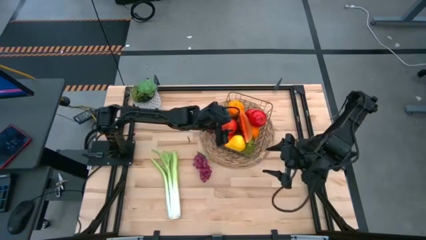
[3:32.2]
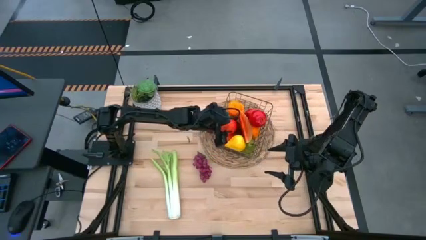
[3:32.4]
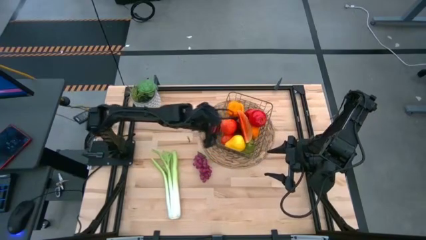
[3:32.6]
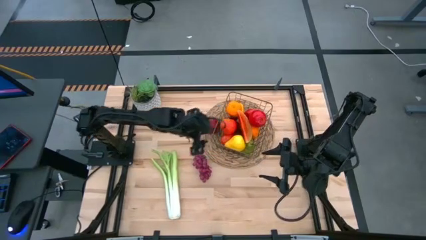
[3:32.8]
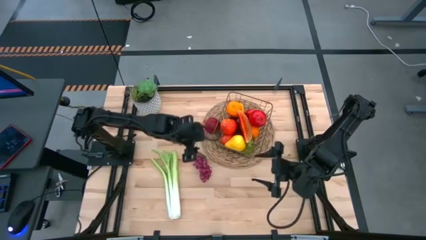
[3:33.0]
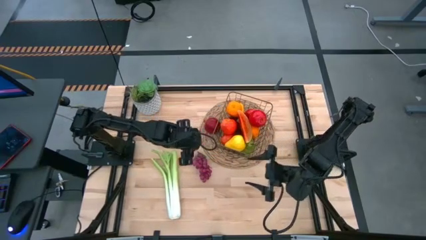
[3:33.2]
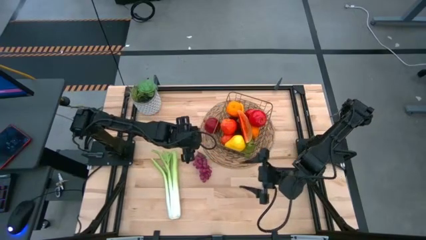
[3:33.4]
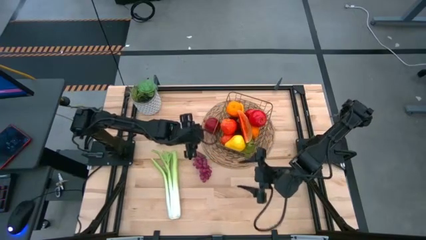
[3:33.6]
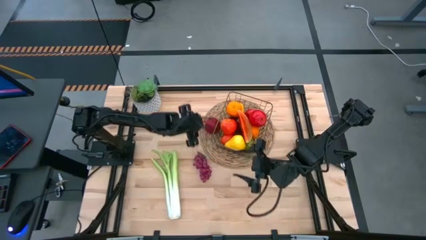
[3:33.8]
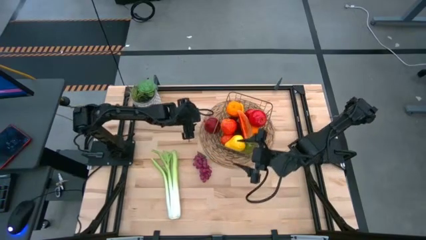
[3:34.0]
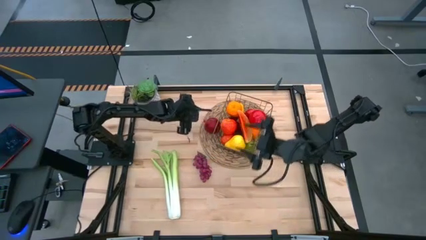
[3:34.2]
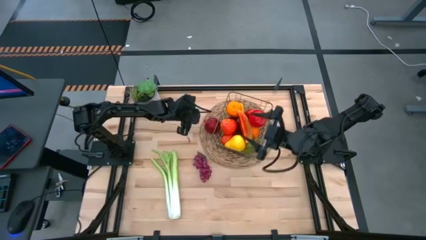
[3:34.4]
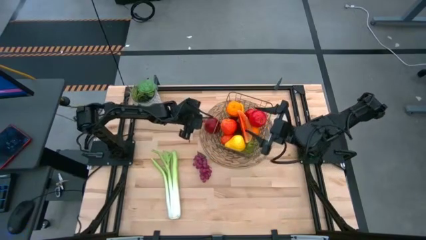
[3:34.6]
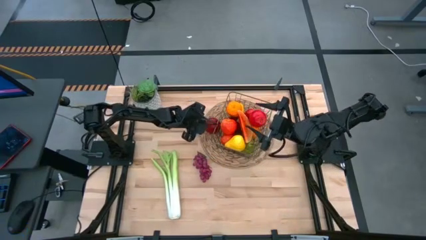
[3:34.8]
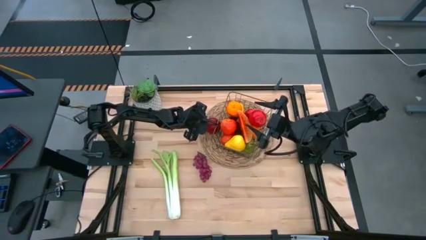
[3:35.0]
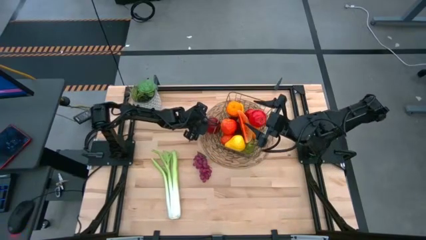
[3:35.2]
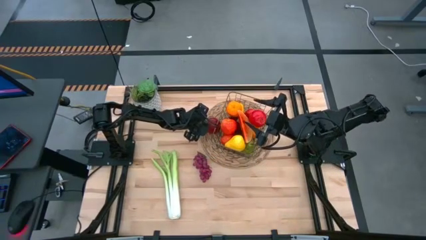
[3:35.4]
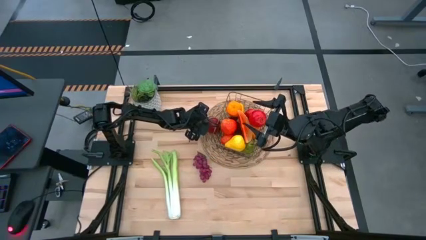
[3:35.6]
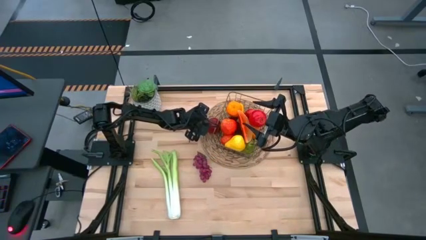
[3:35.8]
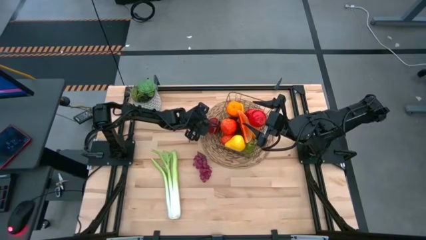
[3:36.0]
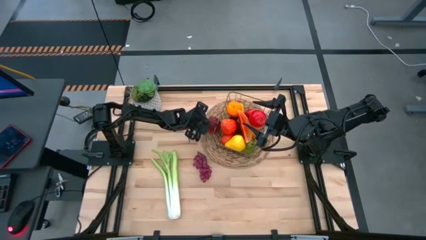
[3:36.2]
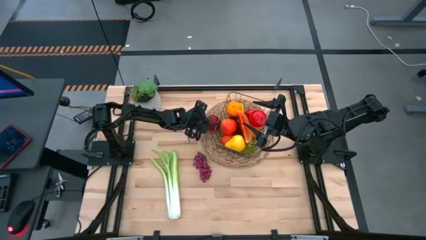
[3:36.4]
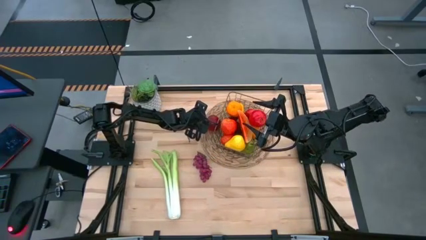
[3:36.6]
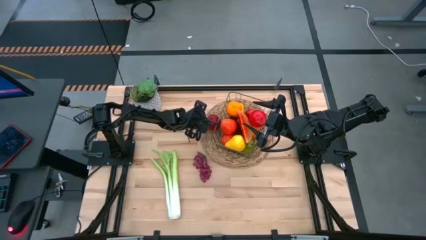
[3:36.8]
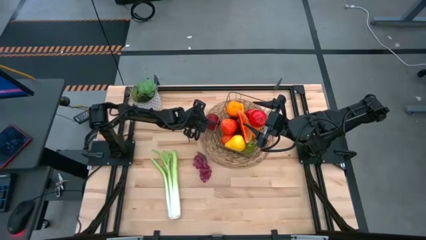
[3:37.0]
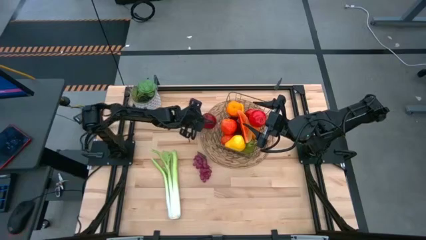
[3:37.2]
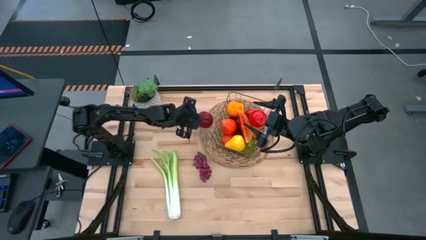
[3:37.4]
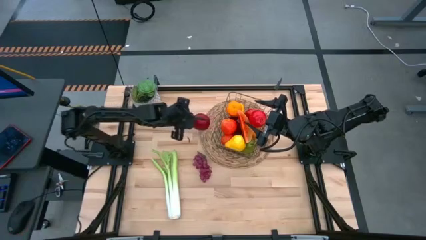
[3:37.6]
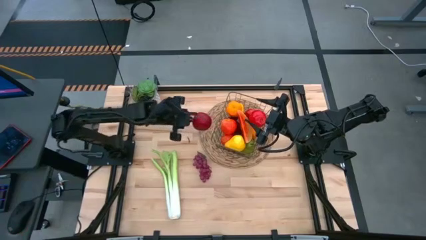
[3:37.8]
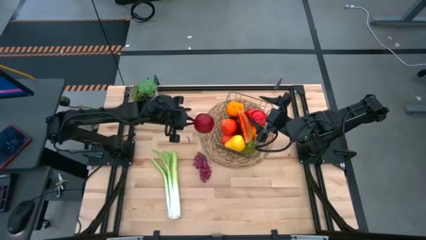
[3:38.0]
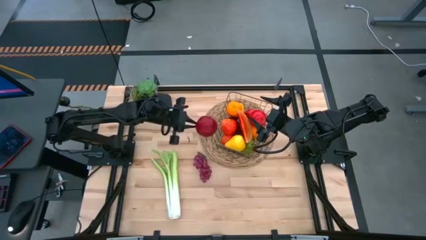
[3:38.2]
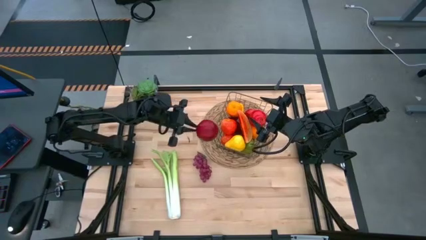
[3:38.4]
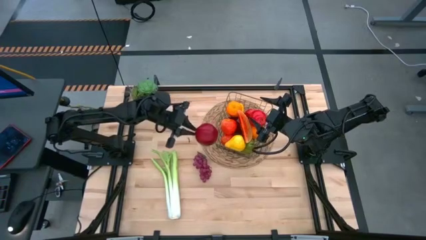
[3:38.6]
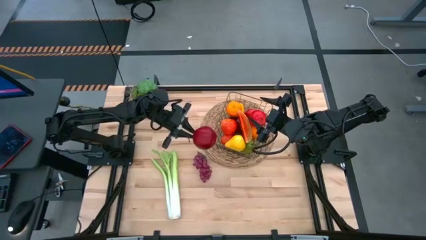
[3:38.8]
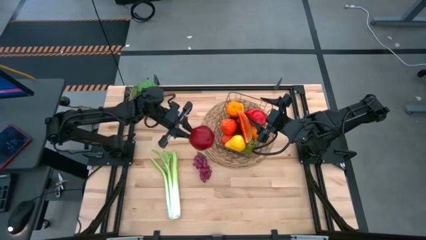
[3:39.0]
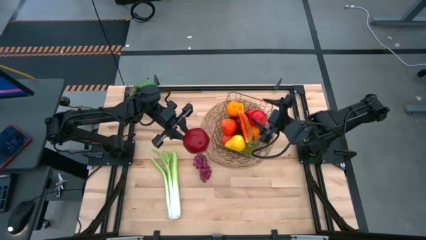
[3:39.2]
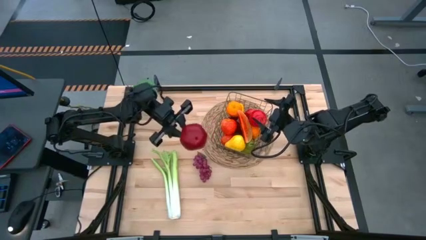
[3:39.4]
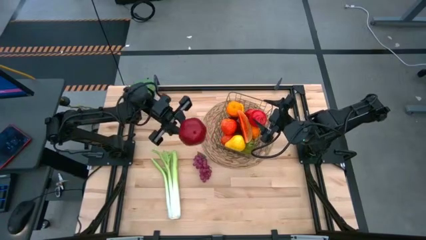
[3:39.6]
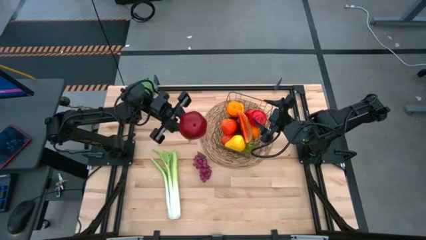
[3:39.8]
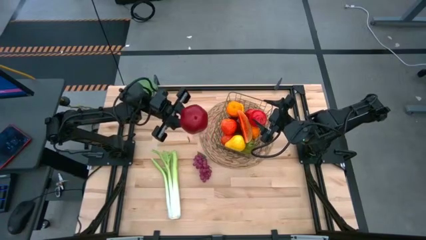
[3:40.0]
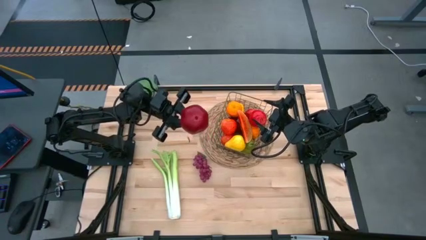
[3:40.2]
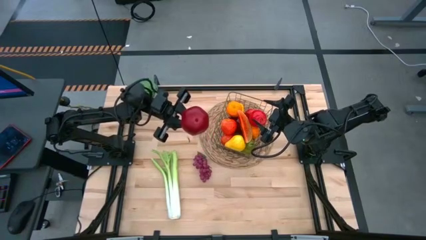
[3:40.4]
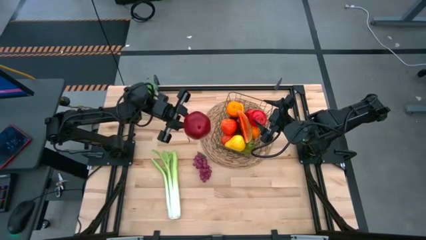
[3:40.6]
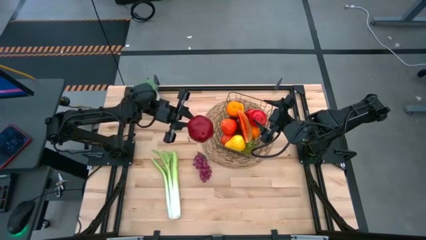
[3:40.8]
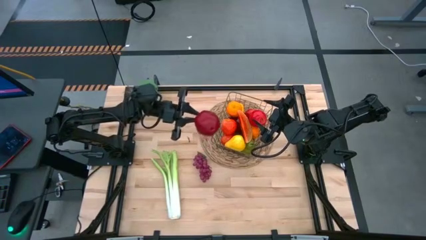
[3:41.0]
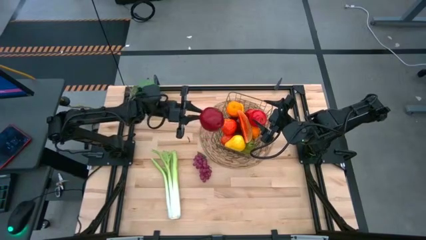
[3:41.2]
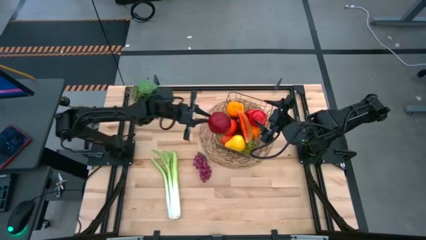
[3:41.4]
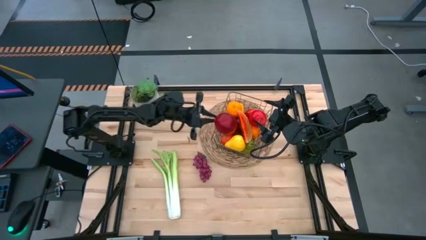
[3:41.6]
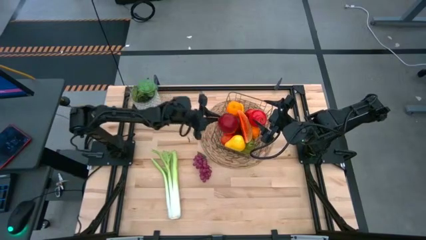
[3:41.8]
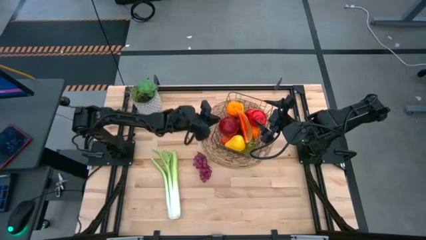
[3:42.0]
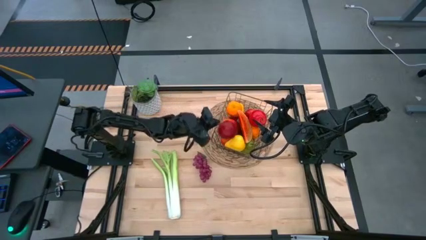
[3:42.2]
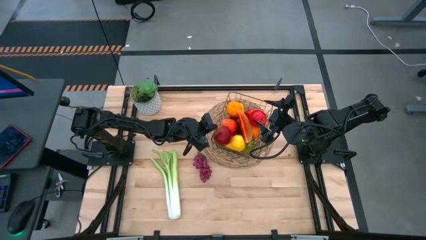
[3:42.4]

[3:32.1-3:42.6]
Task: Build produce basket
Put the red pomegranate into the gold wire basket

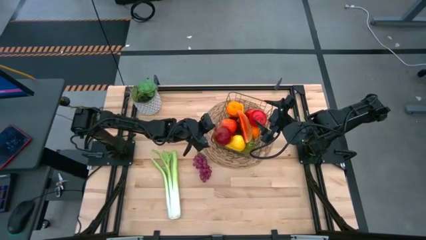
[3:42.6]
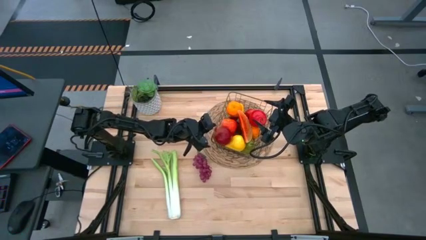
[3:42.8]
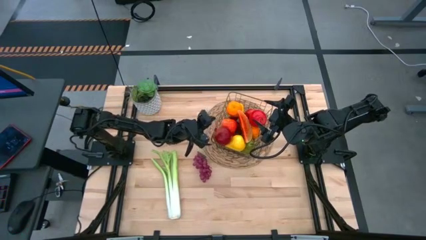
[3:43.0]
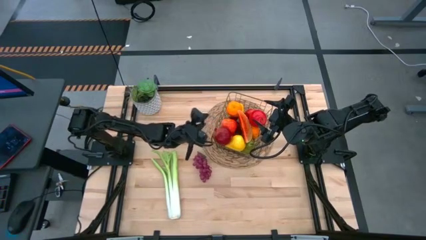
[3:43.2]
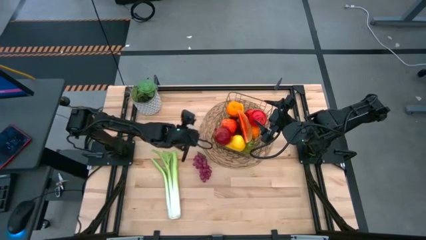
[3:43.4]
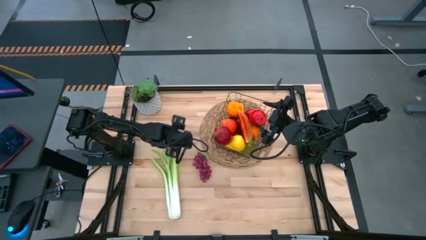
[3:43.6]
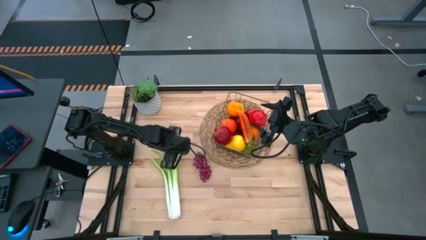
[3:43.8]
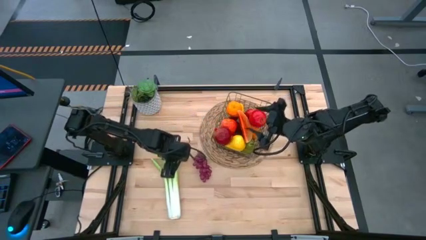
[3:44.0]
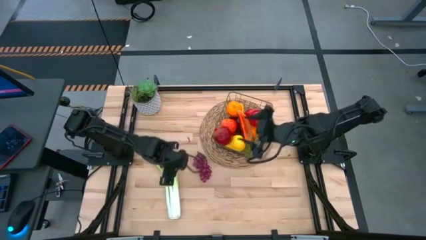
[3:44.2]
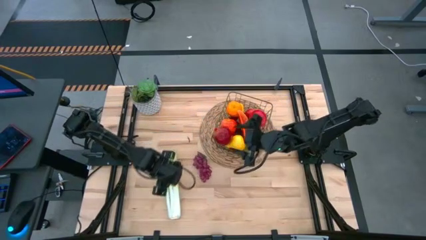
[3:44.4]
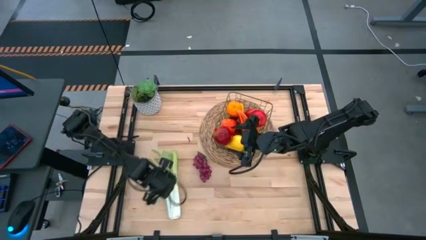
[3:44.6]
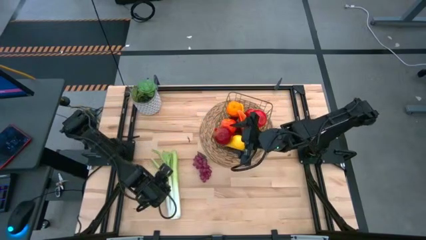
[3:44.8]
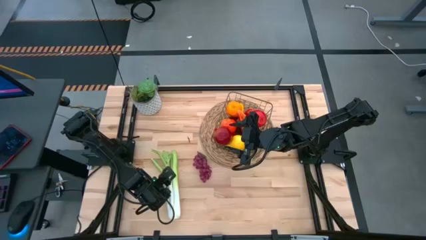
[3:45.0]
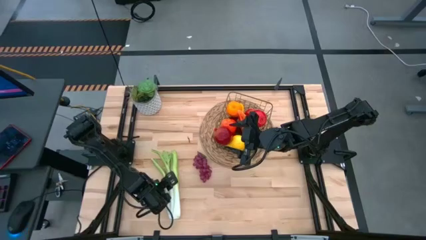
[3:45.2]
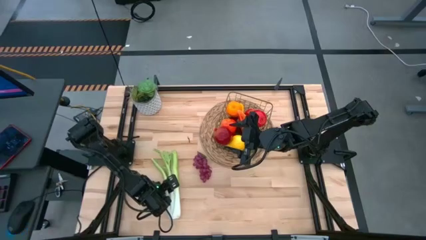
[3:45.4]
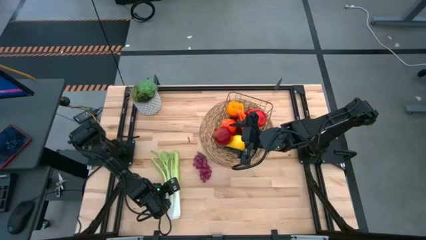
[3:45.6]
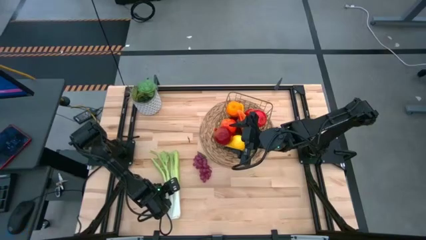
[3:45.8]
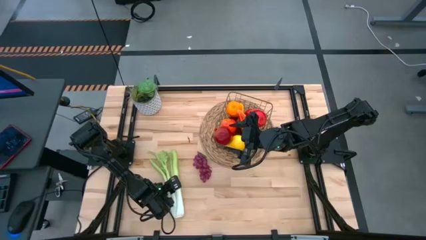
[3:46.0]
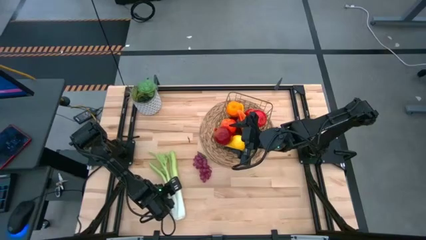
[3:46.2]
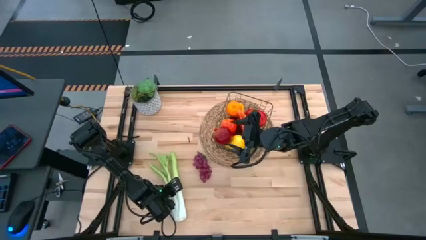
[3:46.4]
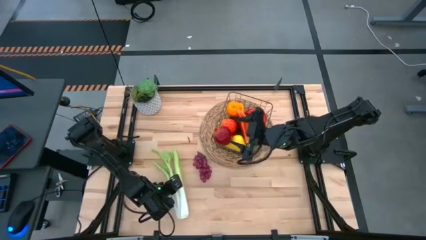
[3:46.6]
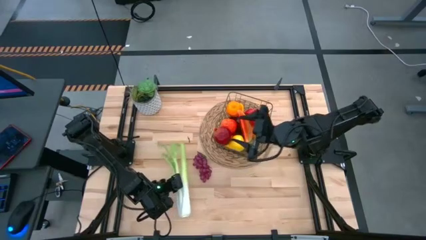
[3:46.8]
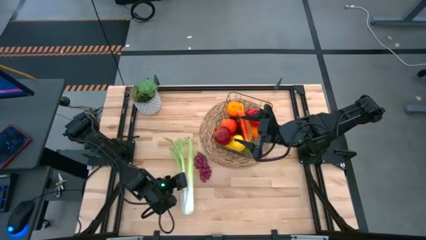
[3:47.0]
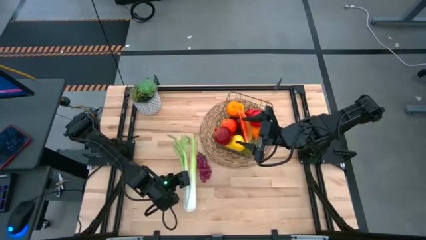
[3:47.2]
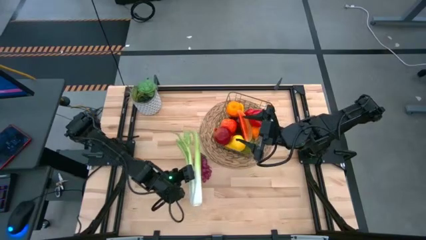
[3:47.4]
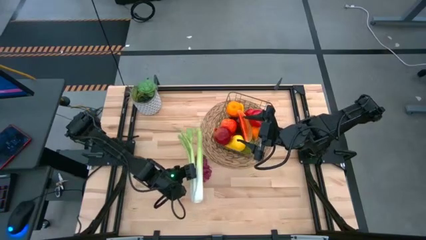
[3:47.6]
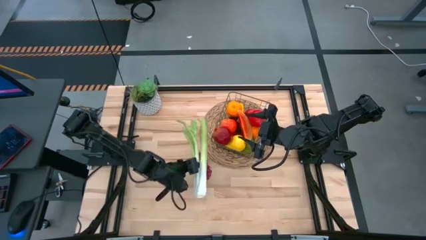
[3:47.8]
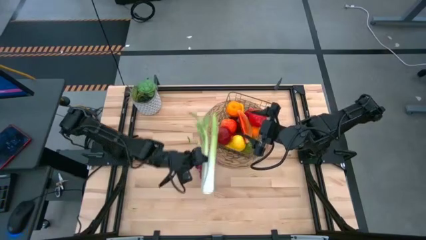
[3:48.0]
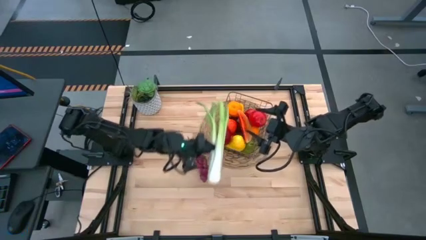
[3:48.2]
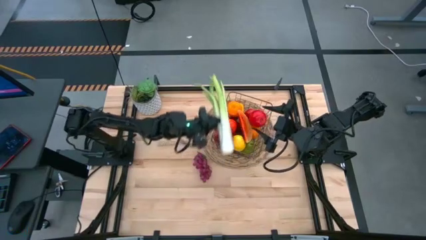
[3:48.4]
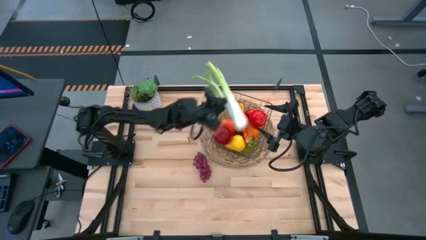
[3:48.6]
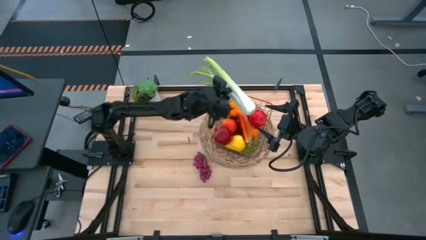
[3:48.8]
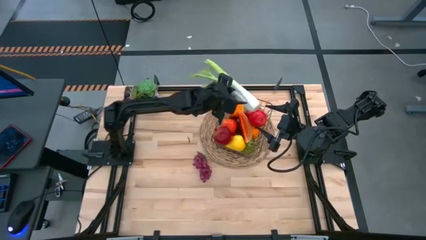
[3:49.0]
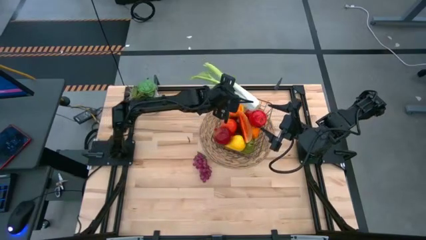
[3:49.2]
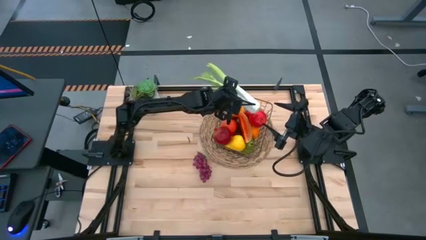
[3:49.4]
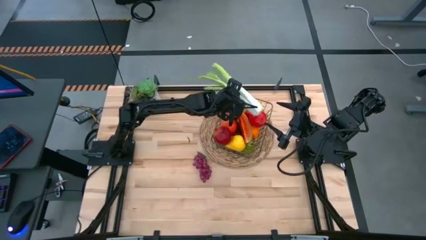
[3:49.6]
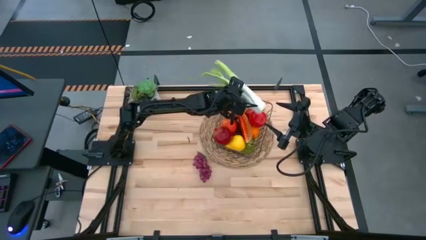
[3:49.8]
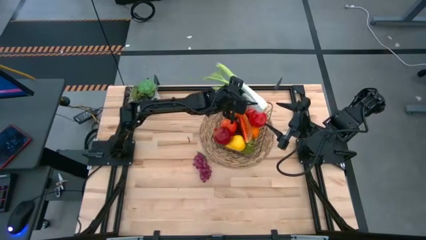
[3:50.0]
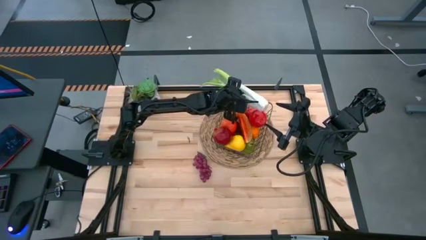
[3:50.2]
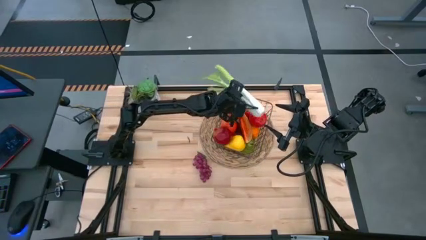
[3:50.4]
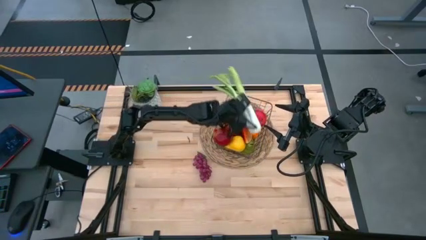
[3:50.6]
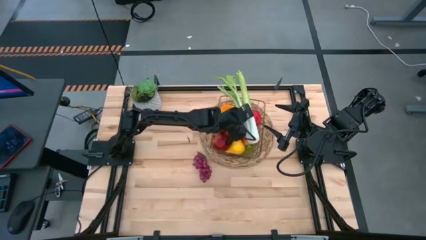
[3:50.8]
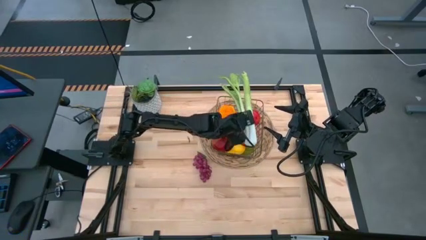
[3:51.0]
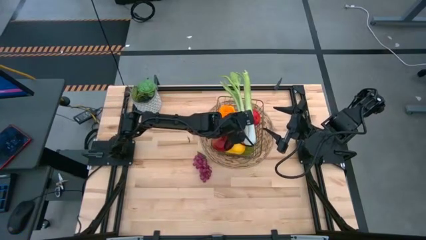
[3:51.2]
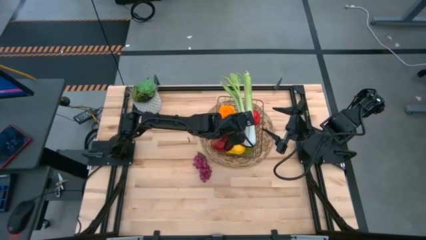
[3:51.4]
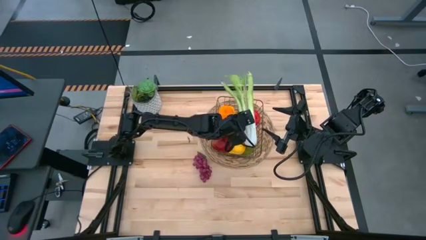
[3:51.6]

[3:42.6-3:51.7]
Put the green celery into the gold wire basket
